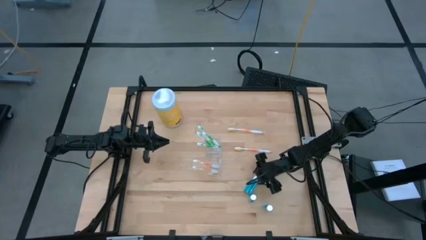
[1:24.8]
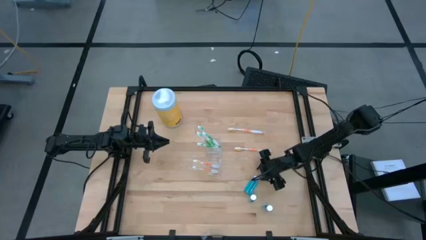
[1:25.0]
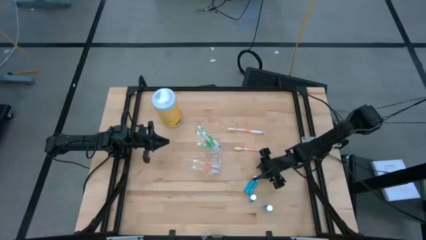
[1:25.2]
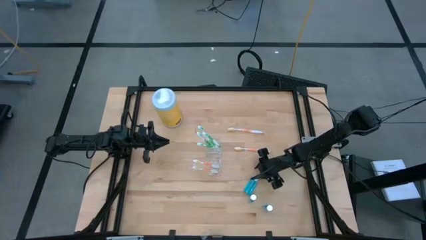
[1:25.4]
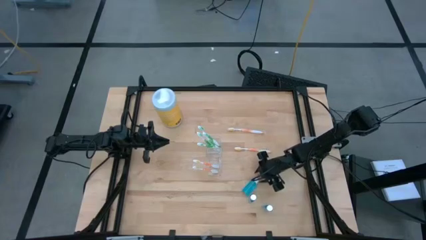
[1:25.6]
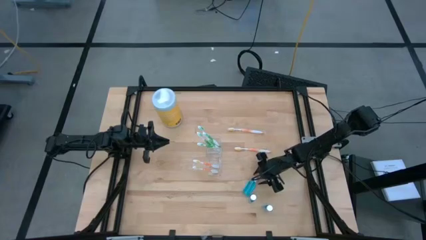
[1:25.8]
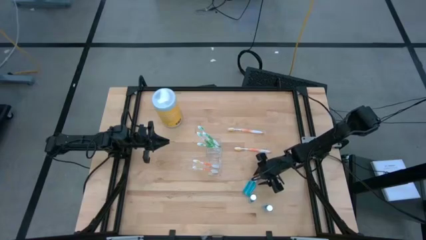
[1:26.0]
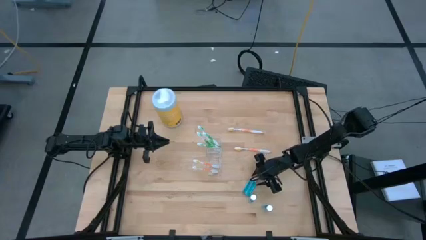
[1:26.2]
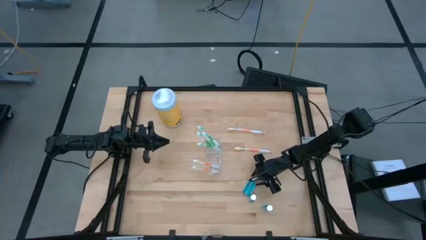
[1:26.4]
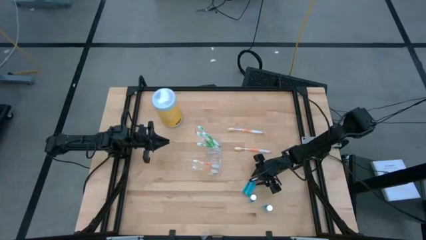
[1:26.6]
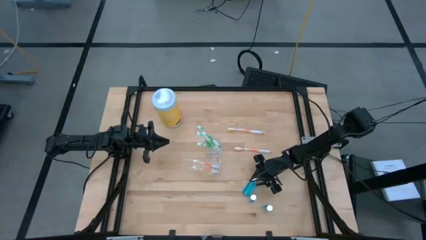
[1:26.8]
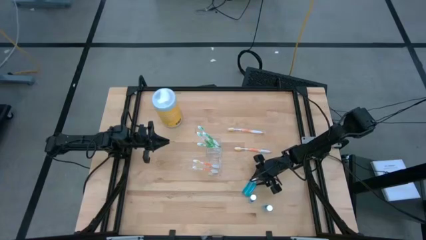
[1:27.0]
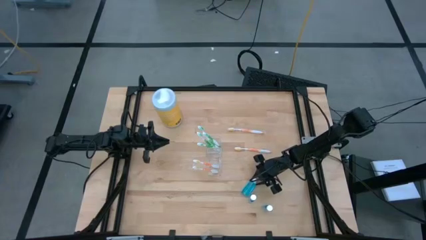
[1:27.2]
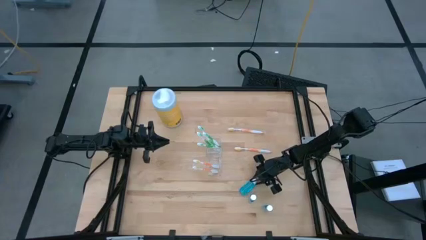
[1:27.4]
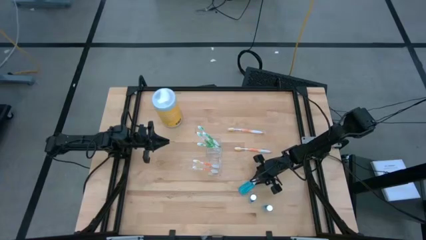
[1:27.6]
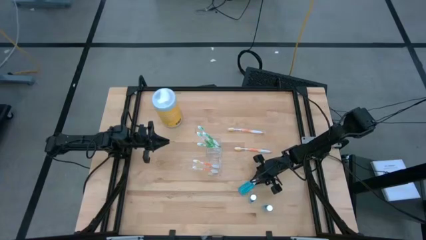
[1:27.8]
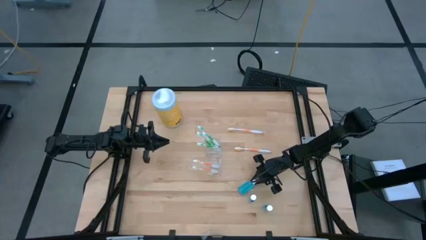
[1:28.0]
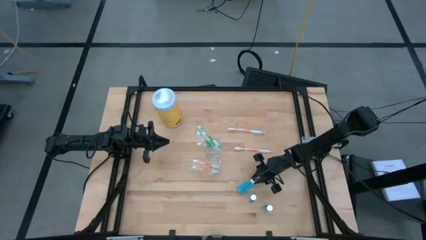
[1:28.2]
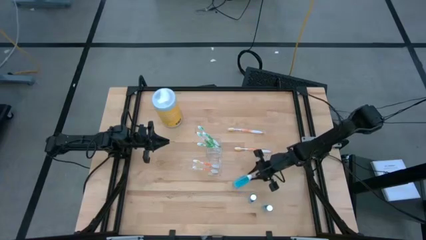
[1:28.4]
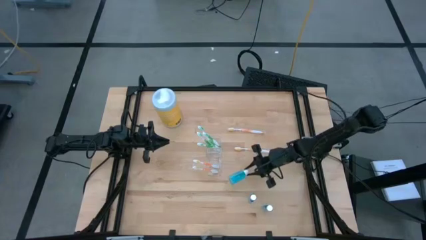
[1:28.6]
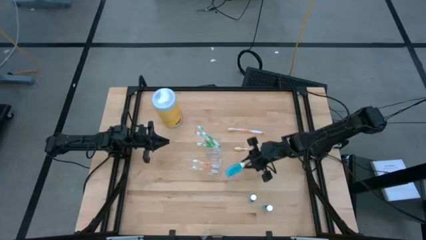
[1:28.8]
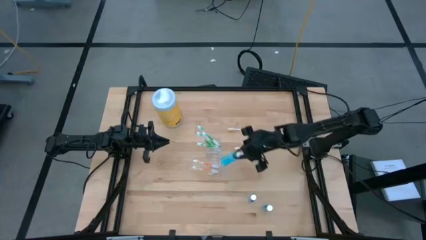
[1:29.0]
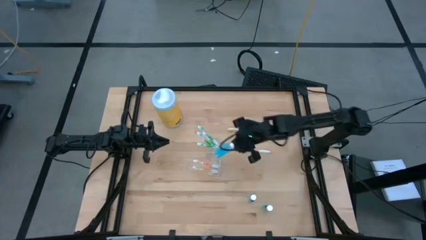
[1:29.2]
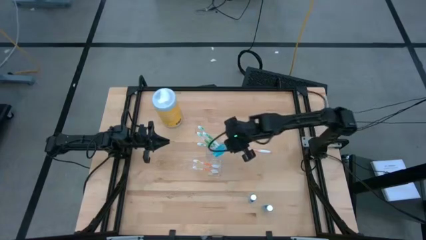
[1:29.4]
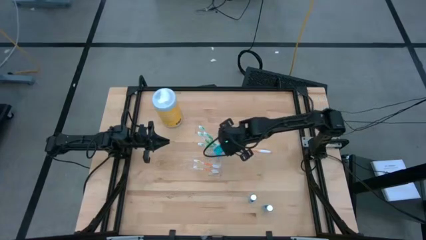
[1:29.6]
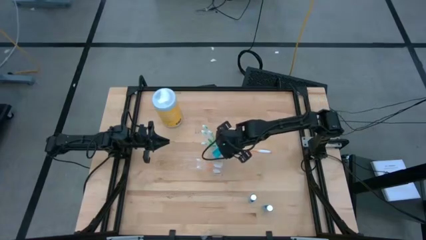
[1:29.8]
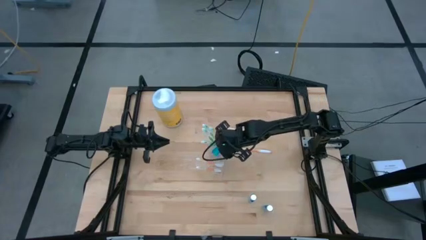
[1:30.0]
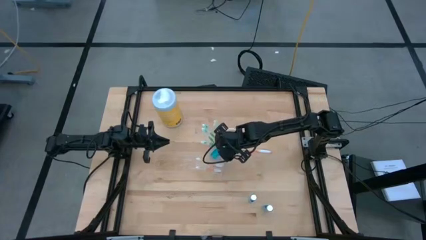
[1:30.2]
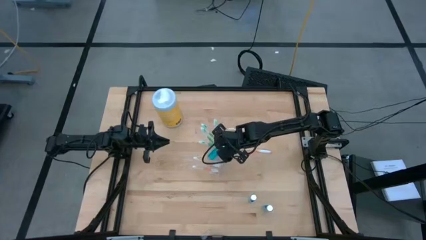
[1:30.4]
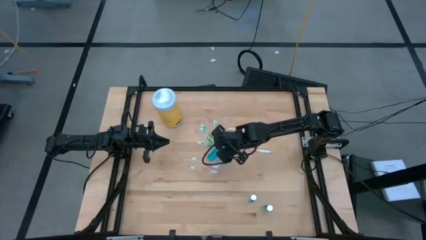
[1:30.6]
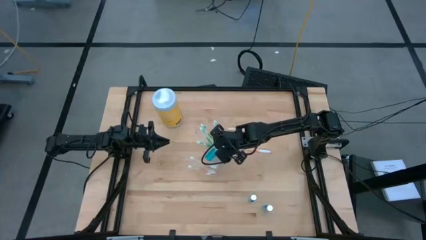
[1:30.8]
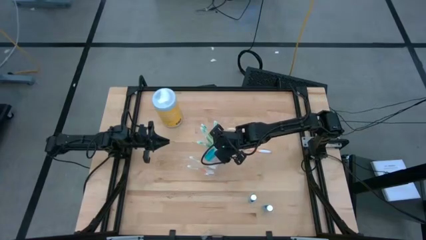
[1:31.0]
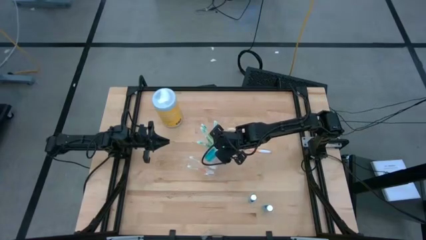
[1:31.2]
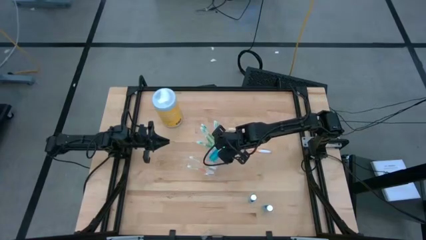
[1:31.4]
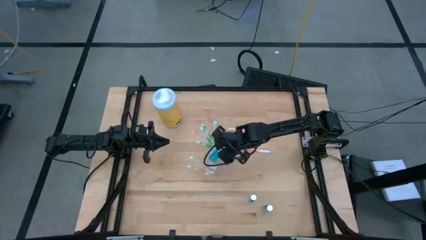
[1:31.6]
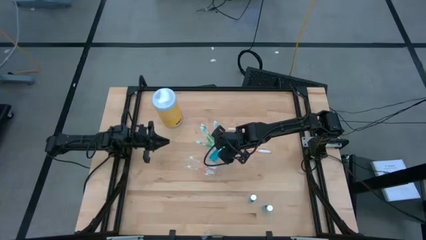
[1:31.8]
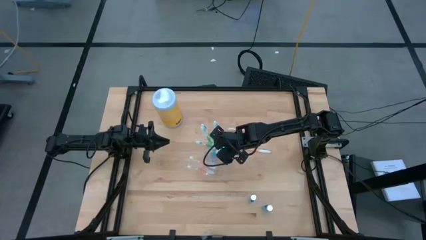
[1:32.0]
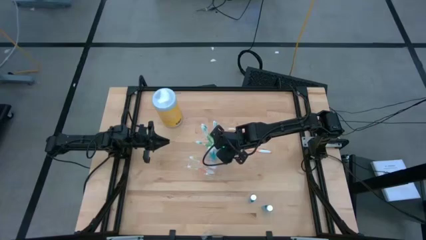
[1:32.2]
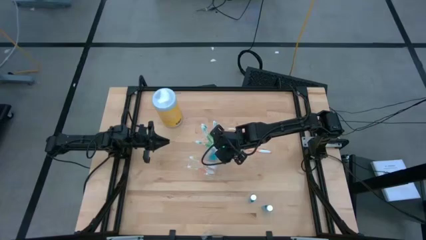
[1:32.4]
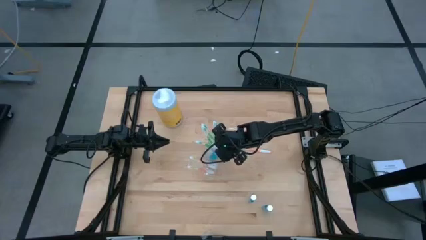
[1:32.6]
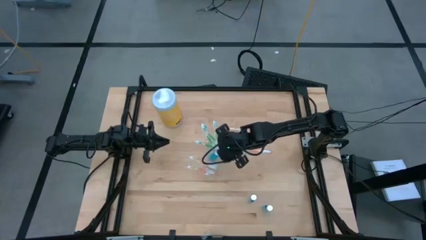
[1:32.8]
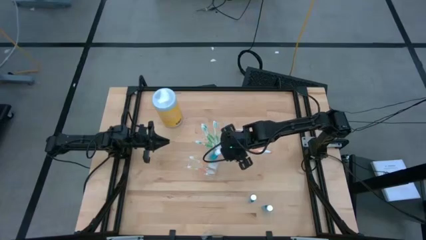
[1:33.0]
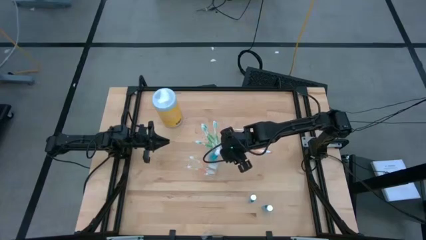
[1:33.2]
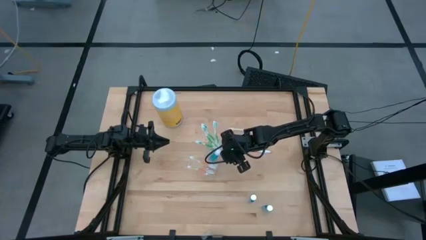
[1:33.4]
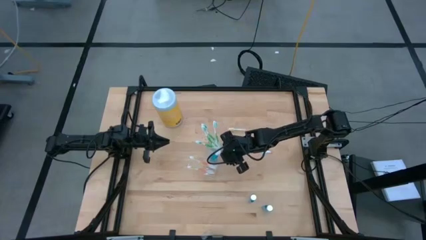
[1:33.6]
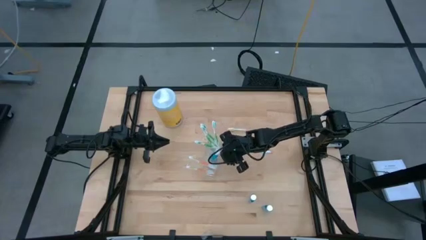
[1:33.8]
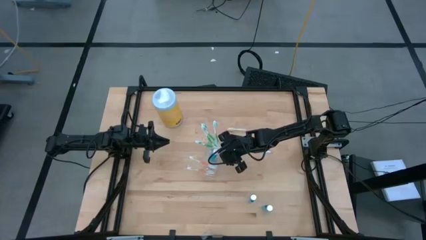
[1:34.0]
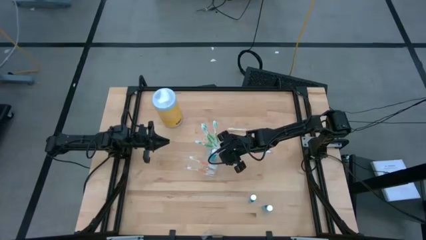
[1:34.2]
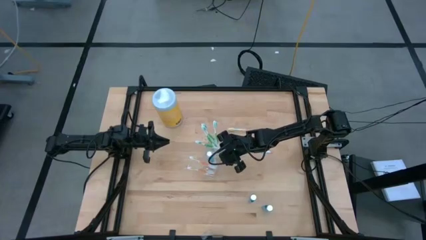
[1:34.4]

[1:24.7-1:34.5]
Task: Pick & Place toothbrushing station
Put the blue mouthwash bottle into the transparent organizer

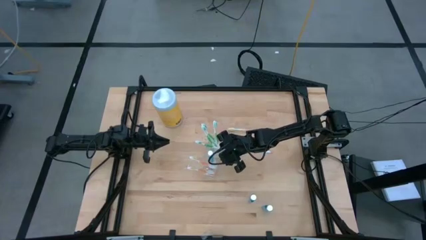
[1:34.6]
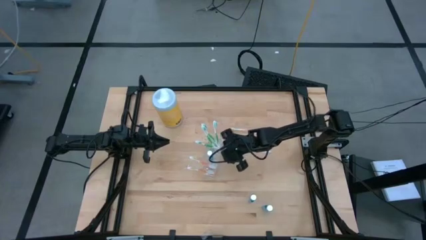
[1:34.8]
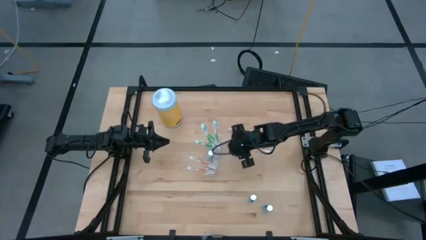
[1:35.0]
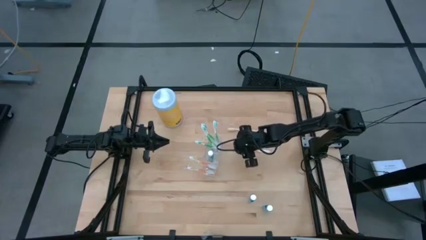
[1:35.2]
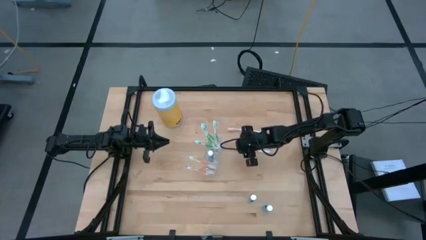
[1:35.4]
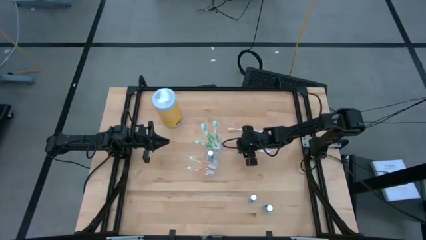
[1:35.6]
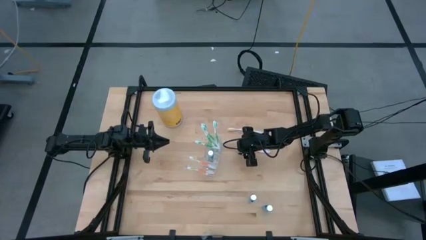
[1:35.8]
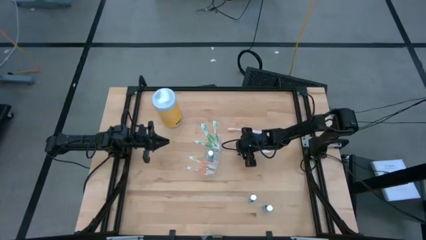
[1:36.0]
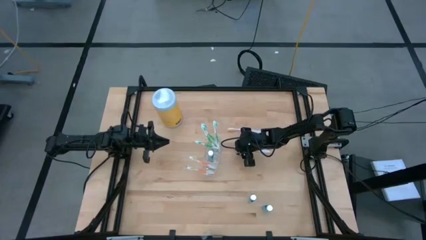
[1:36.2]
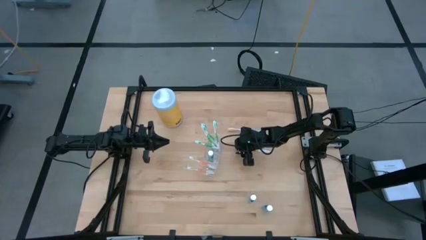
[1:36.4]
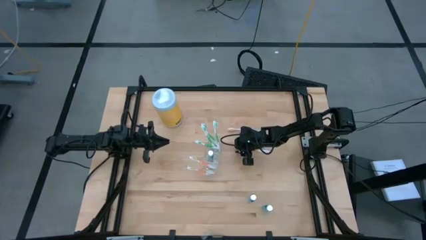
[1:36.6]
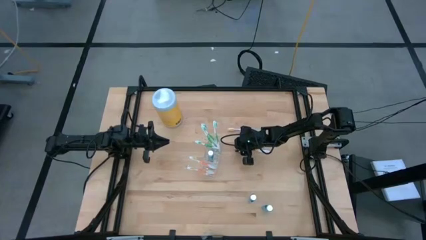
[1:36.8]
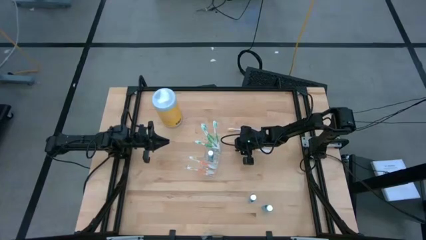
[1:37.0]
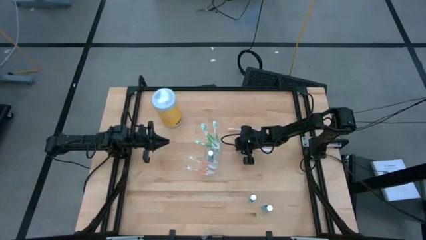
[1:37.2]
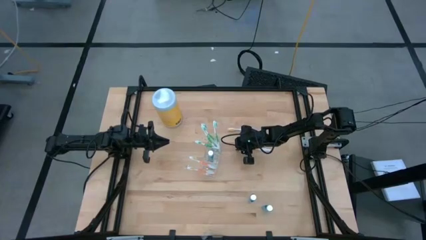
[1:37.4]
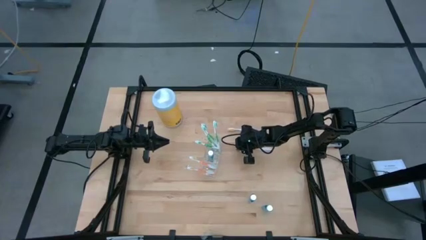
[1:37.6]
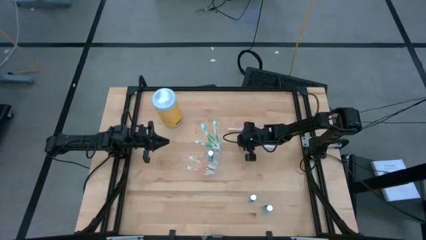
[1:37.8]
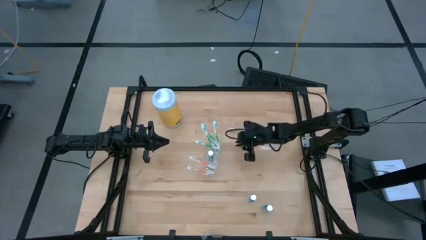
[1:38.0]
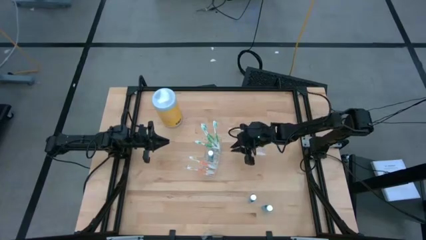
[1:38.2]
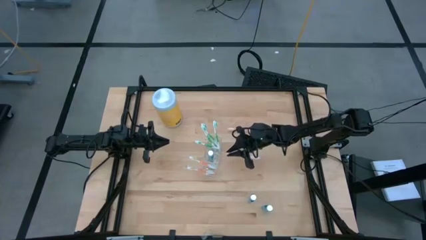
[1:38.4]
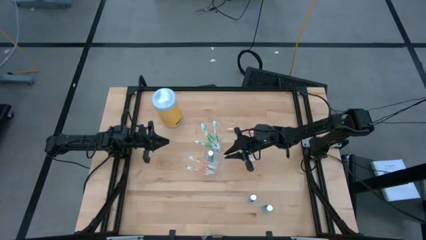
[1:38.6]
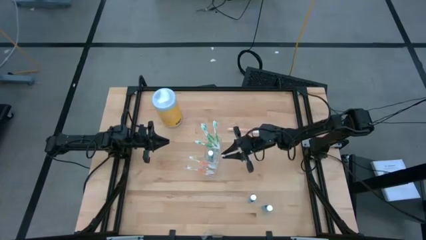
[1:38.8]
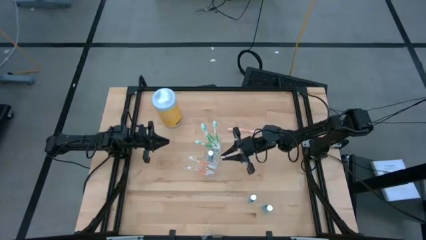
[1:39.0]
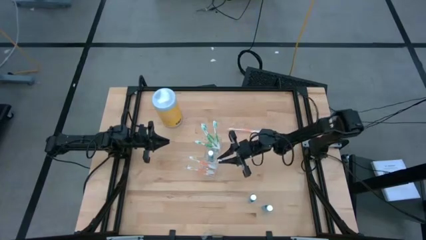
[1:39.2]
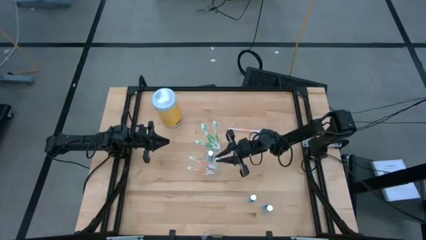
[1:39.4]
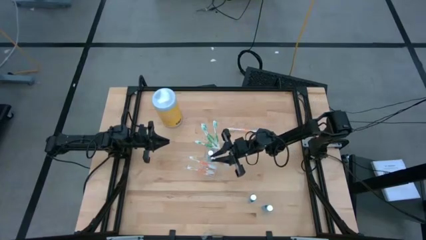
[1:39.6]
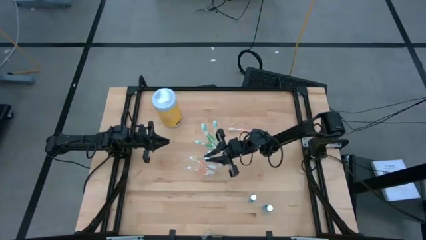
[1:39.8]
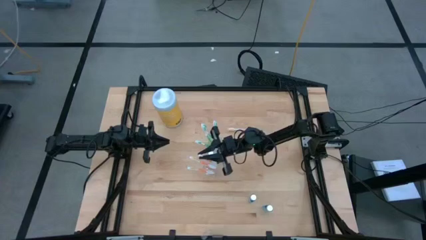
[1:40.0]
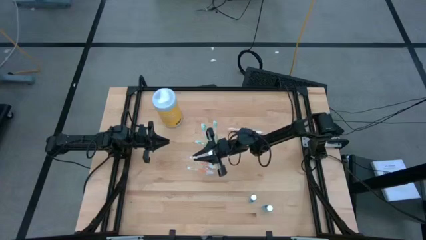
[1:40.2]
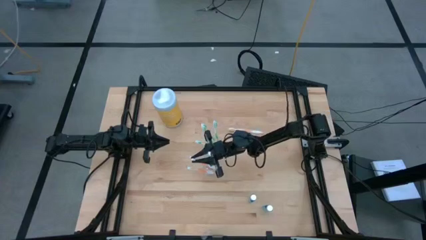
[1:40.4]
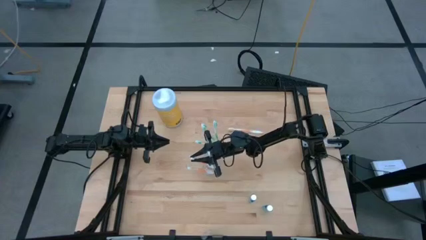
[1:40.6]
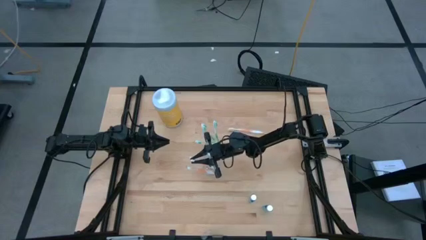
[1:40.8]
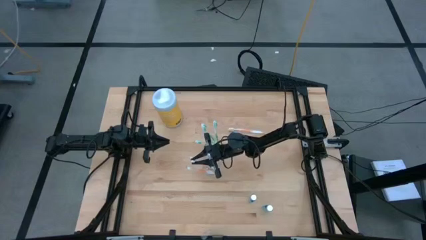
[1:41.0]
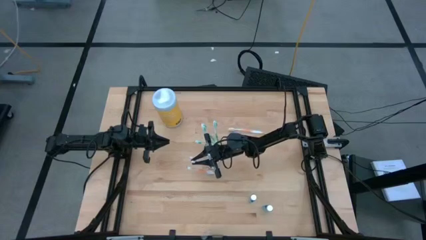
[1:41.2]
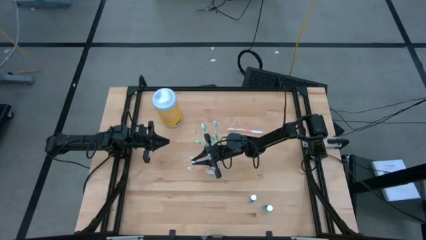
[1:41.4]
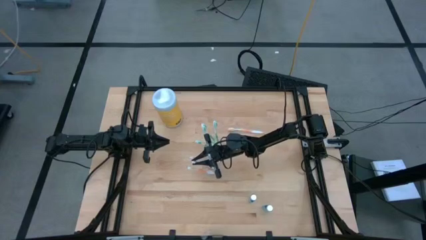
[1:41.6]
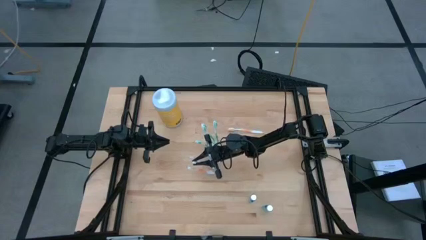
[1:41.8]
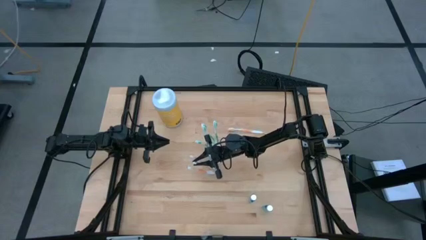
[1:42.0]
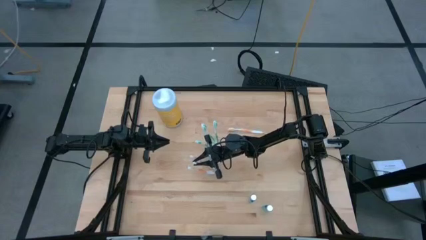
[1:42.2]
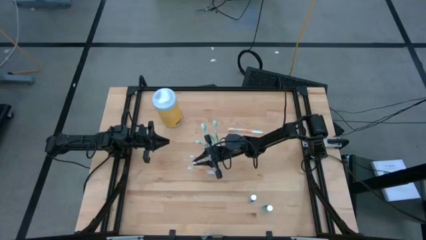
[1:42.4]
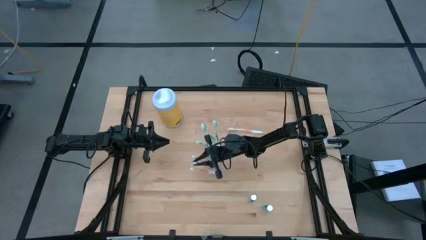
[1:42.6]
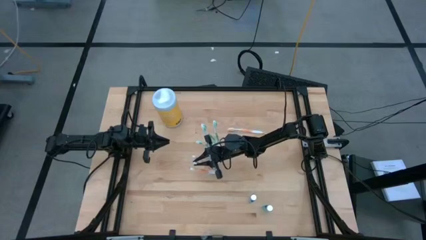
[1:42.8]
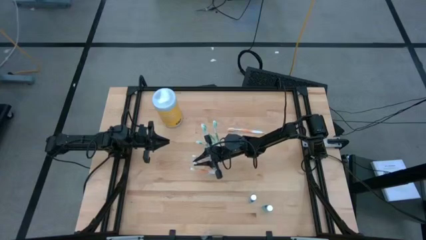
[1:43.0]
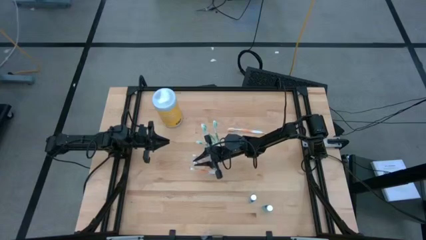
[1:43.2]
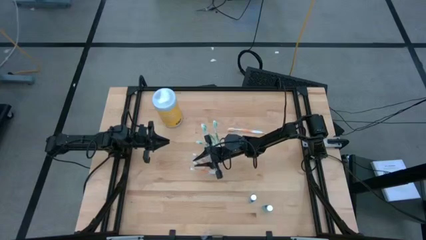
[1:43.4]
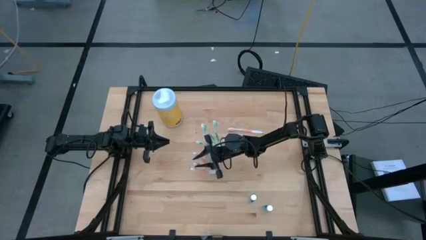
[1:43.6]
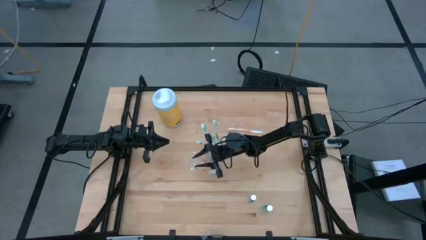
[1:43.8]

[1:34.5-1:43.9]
Put the orange toothbrush into the transparent organizer
